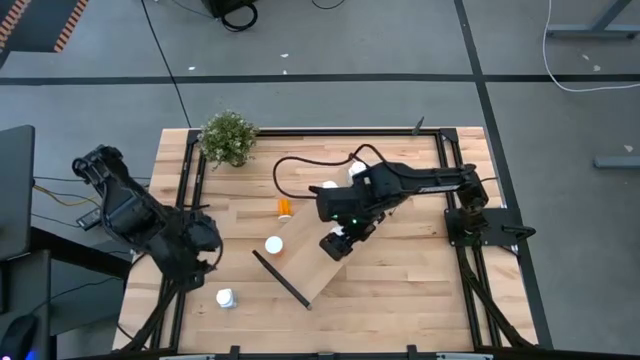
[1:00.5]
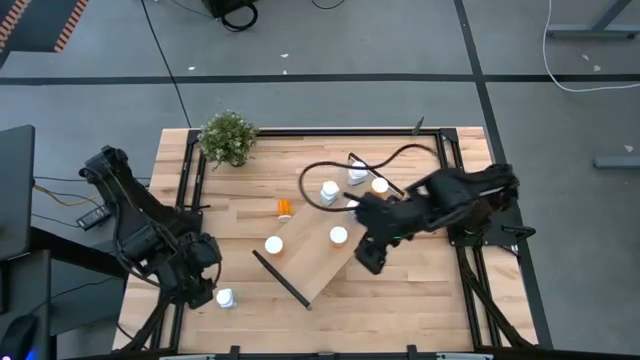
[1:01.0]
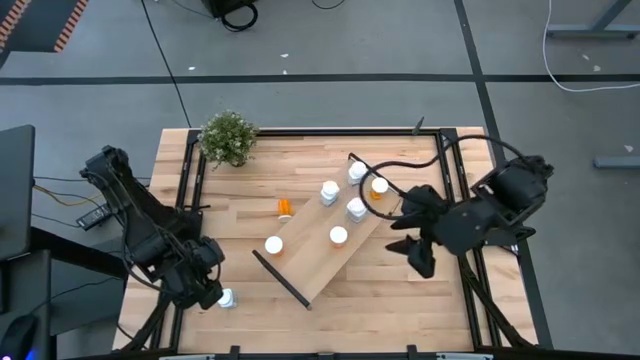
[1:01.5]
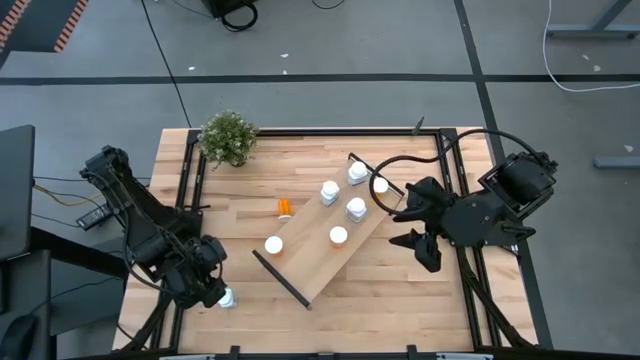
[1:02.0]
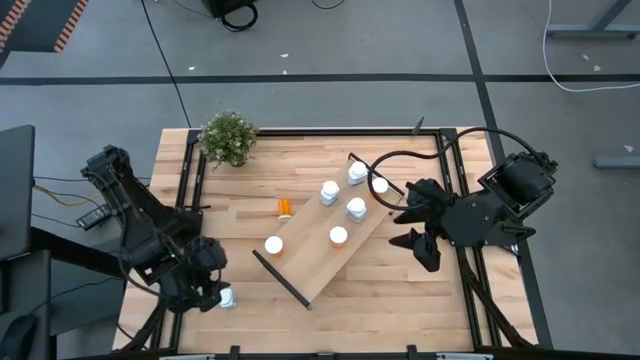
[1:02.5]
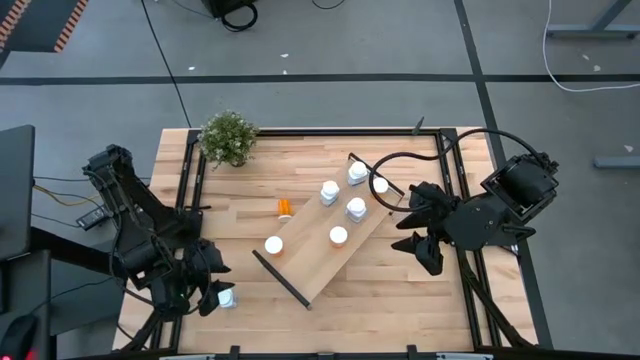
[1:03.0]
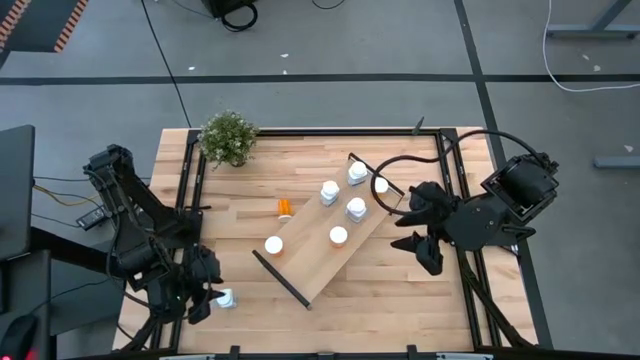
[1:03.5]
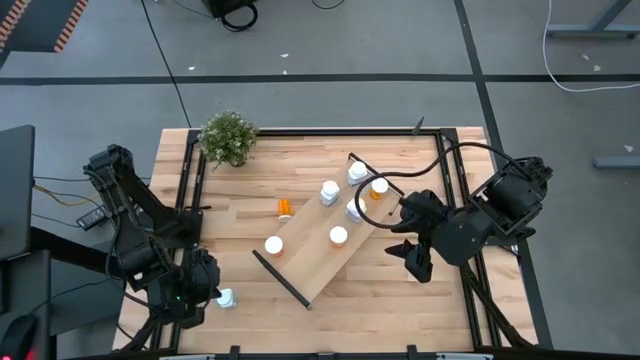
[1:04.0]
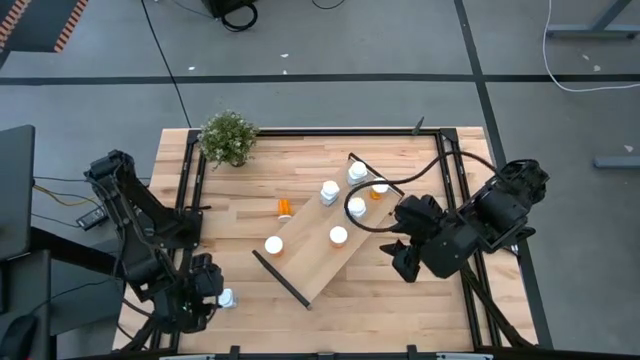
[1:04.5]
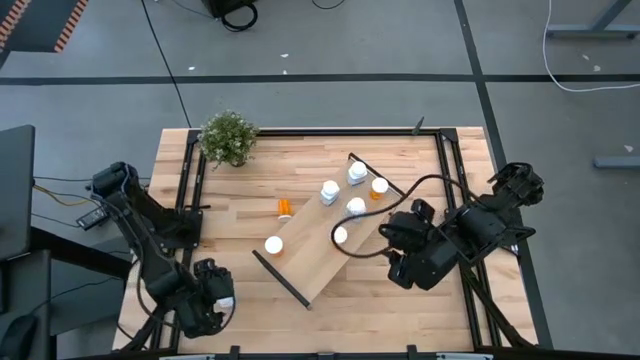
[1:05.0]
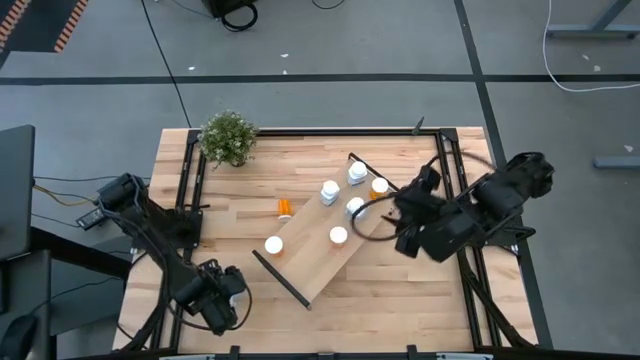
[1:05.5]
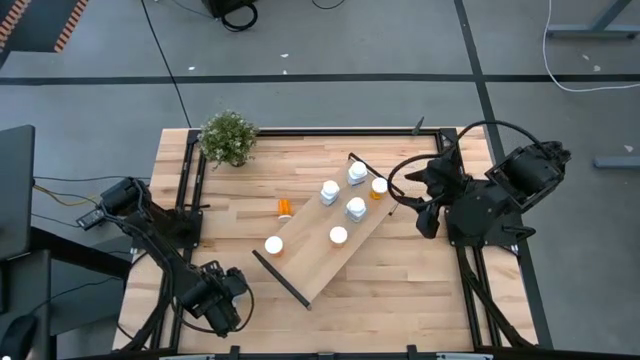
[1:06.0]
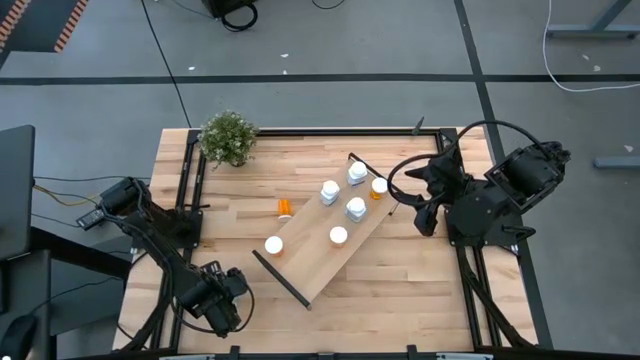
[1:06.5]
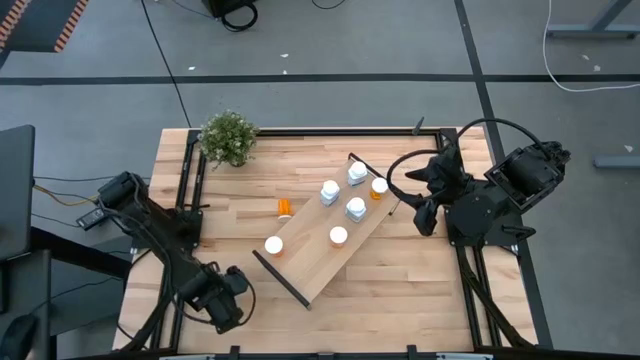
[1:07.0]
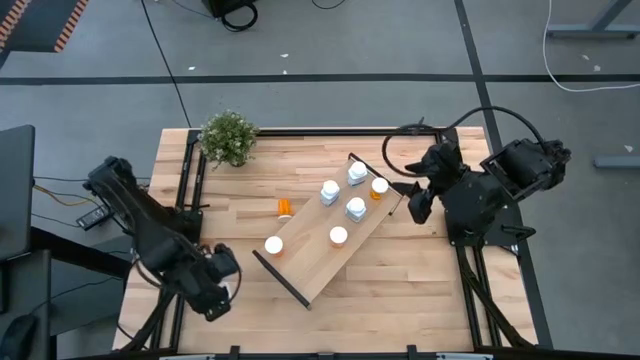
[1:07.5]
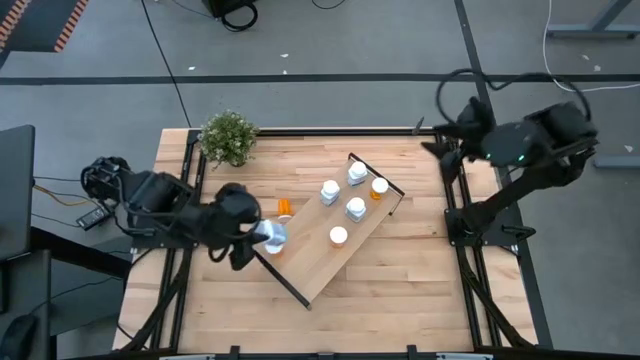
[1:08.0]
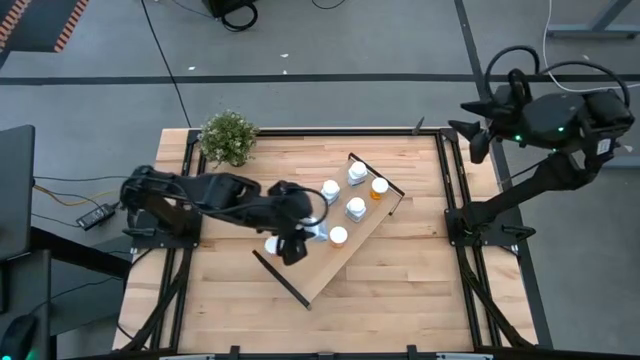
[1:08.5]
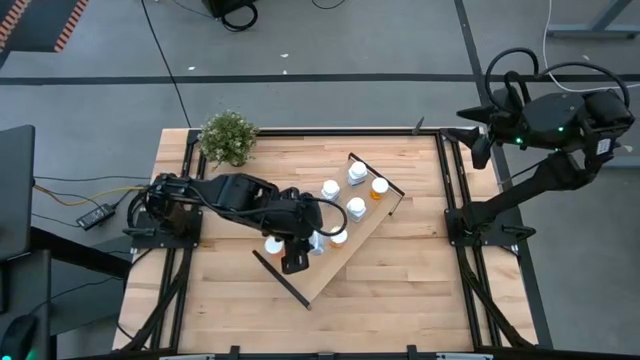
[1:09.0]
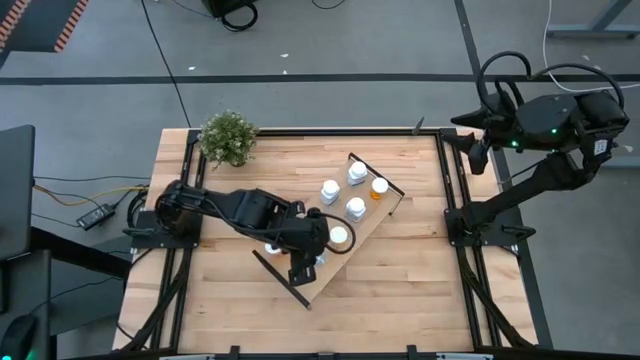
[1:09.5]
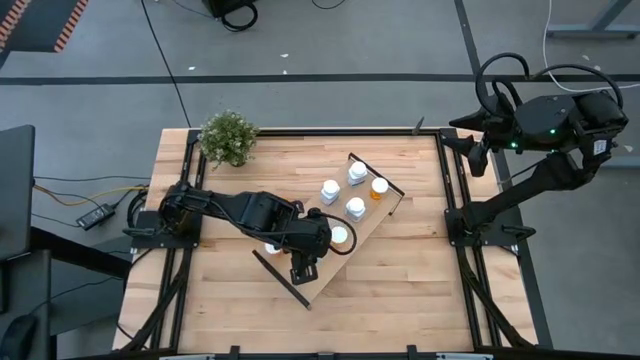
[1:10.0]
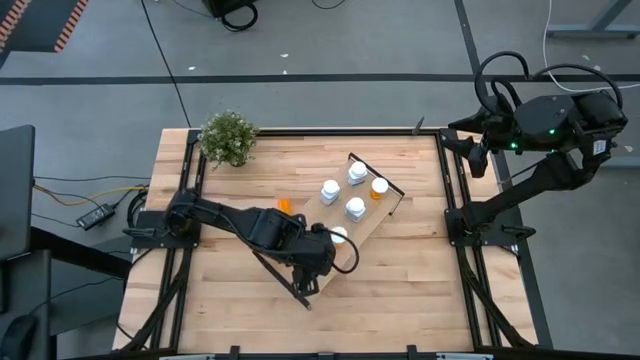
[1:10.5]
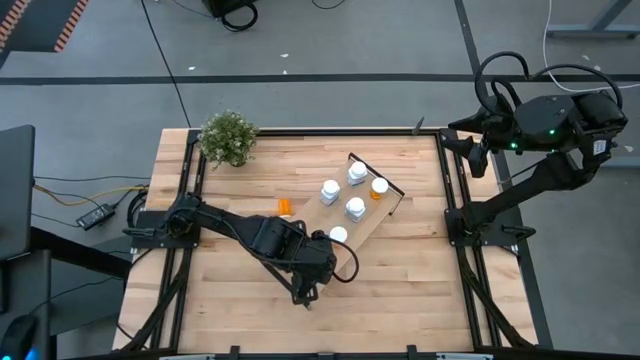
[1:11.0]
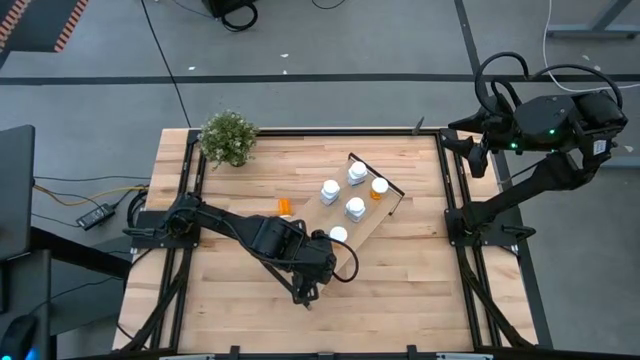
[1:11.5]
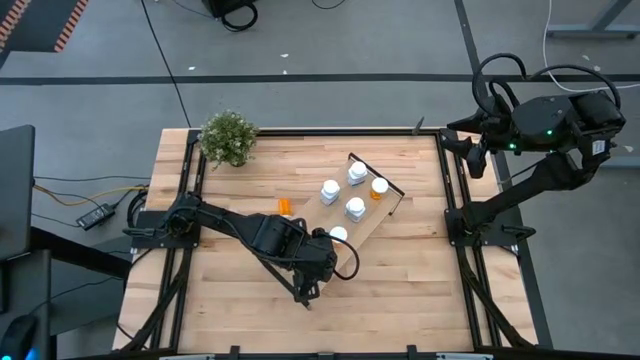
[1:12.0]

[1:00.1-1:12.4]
Task: Pick and place medicine bottles onto shelf by color
Put the white pill bottle on the shelf

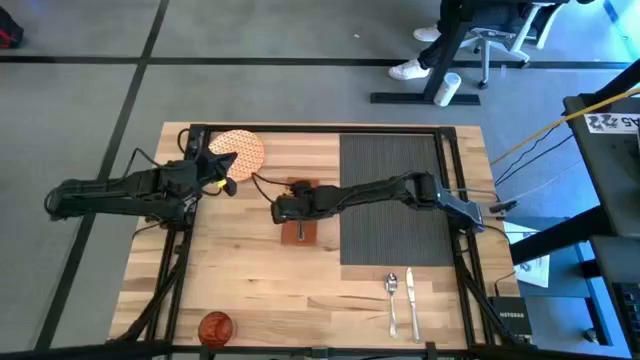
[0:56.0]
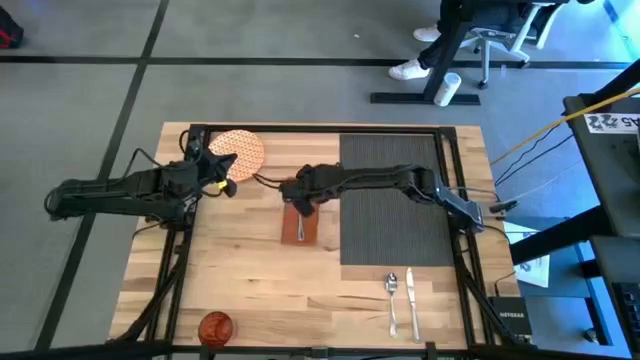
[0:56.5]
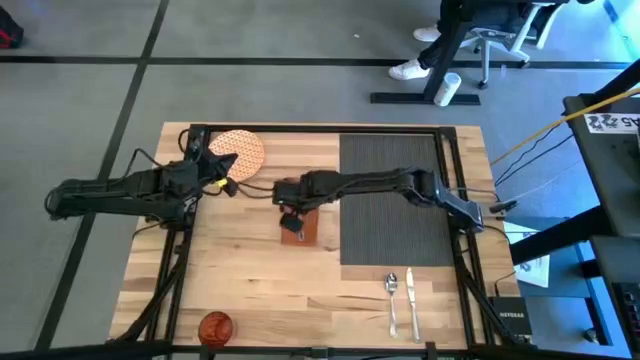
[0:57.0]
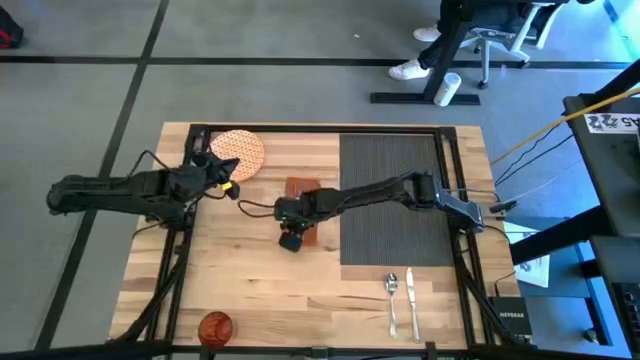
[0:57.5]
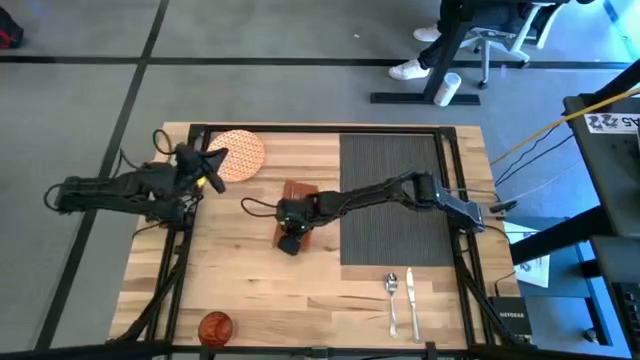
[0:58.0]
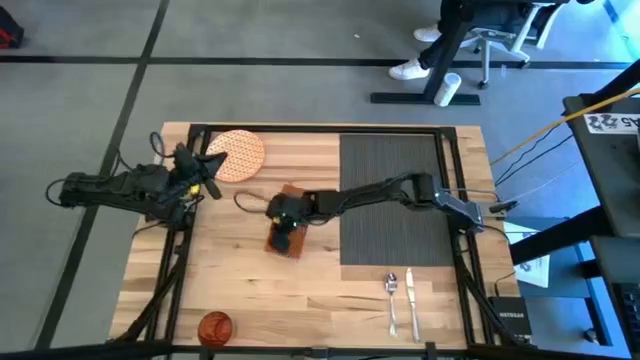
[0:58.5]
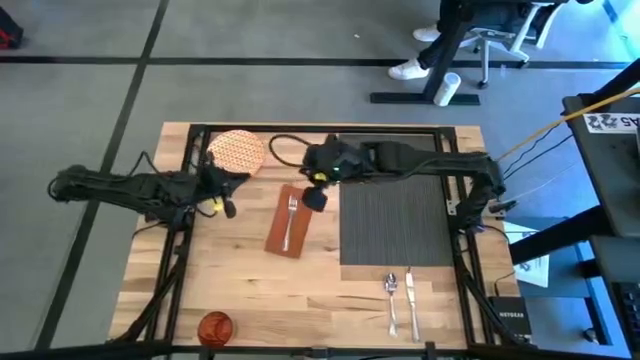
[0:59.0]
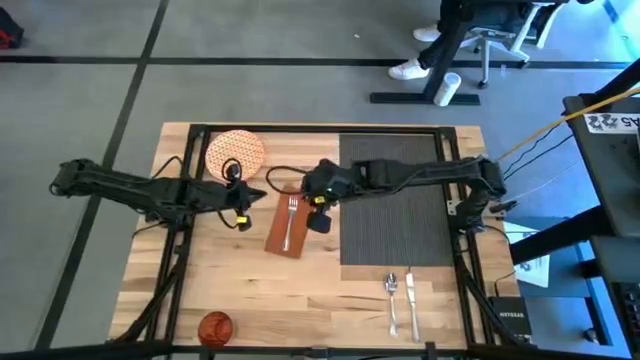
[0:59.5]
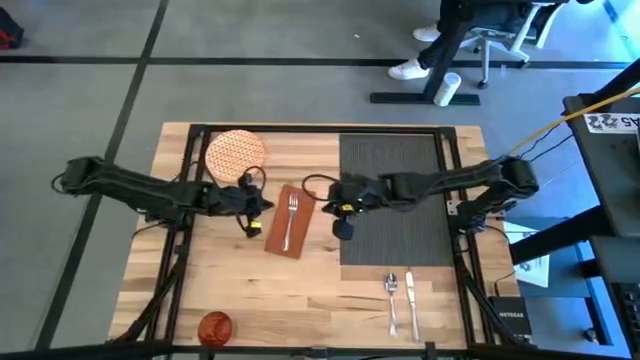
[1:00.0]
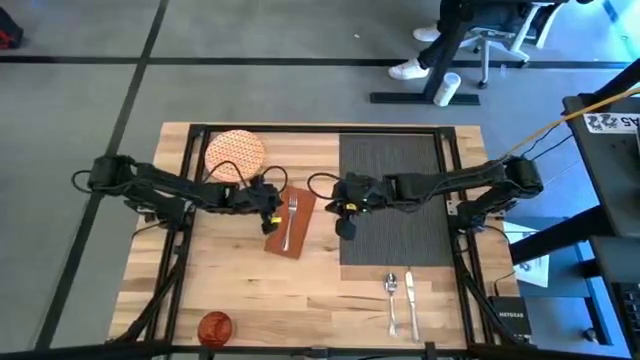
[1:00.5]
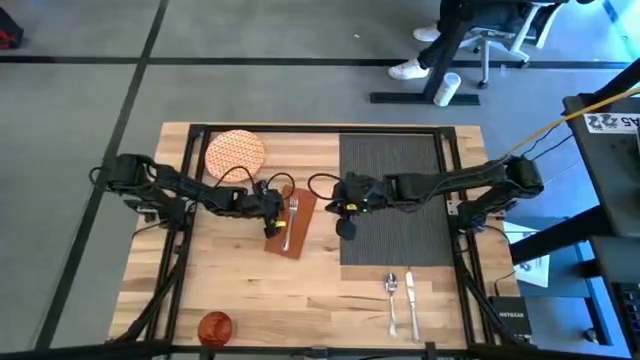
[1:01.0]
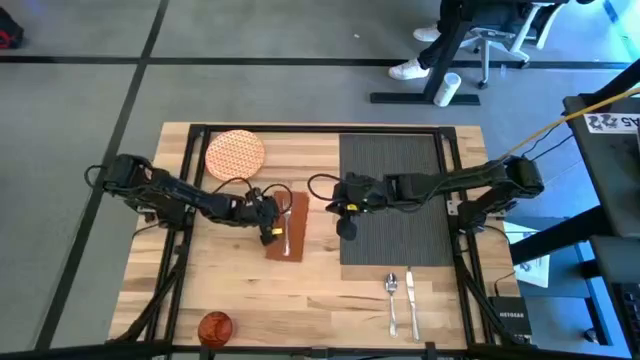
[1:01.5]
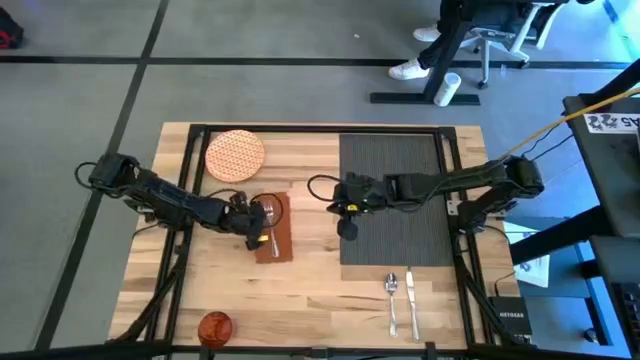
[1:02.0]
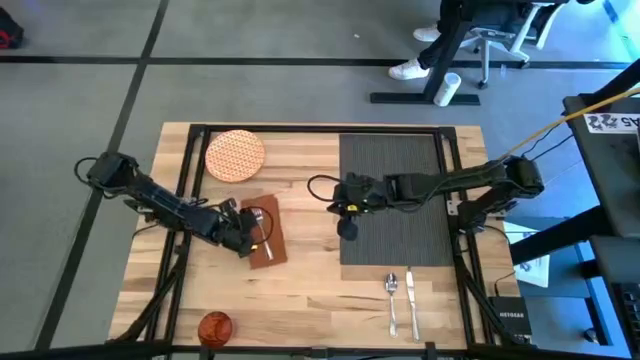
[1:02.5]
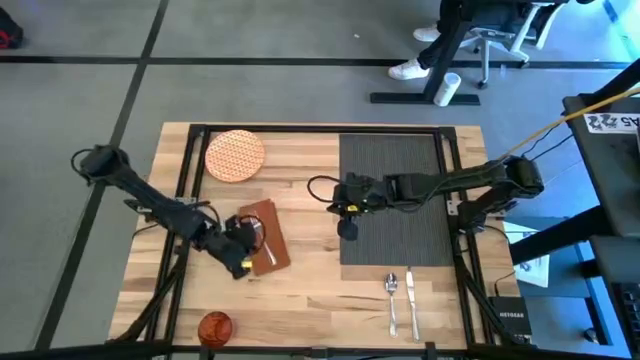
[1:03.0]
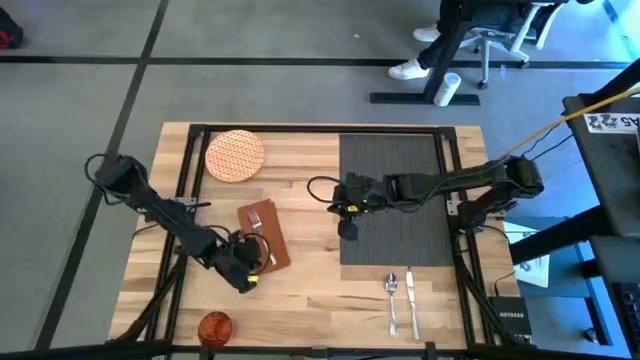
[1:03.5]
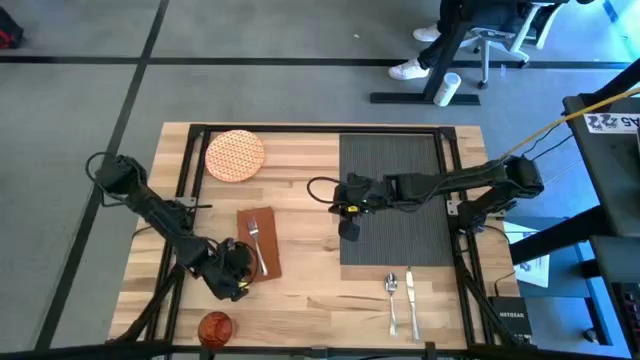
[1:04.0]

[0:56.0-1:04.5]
Task: Set table place
Move the orange table napkin to the middle left

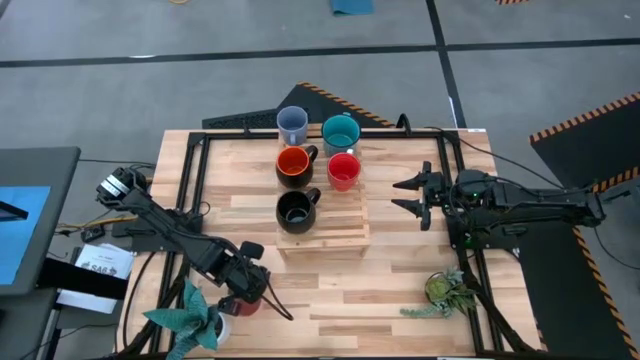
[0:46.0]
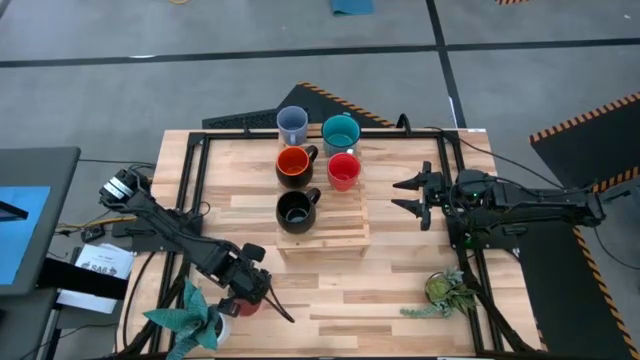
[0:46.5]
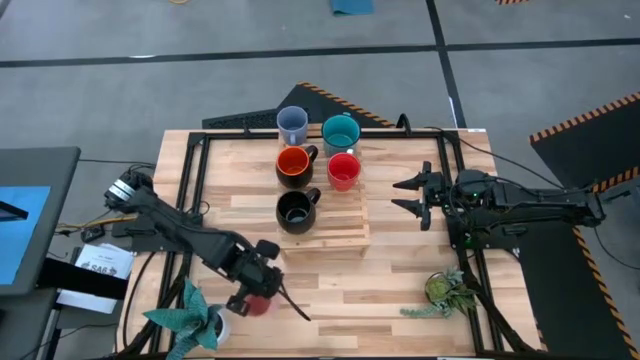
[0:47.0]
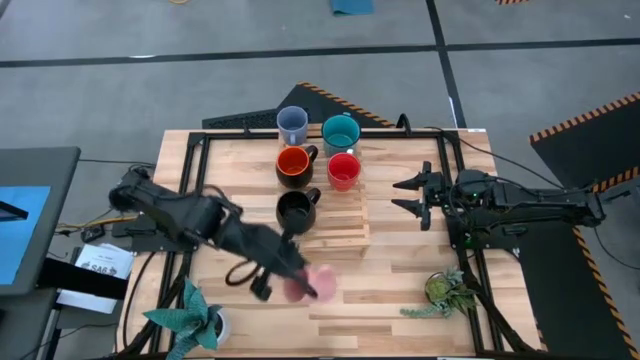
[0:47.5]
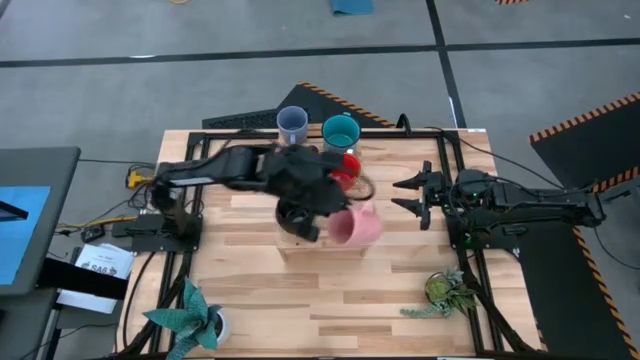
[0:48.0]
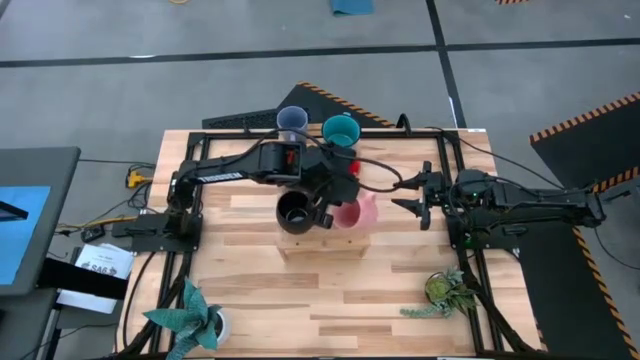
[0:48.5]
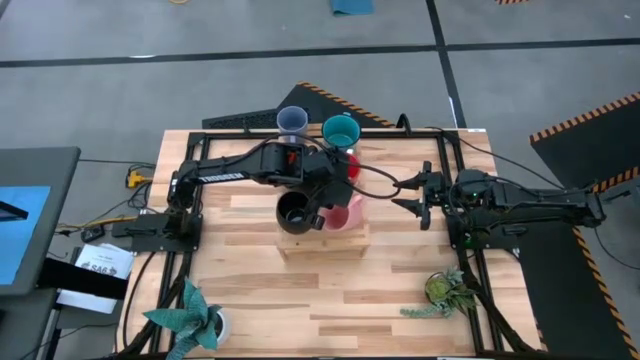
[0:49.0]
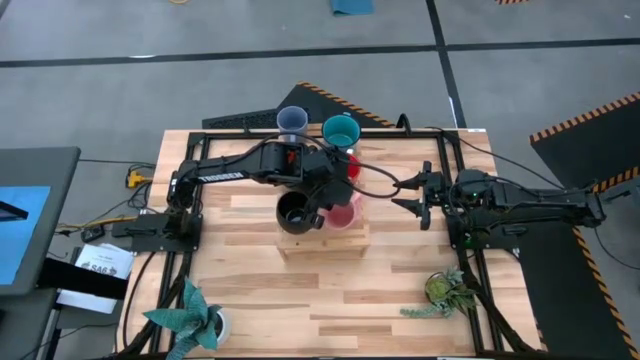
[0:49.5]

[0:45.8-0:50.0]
Task: Place coffee mugs
Put the pink mug on the shelf aligned with the red mug
